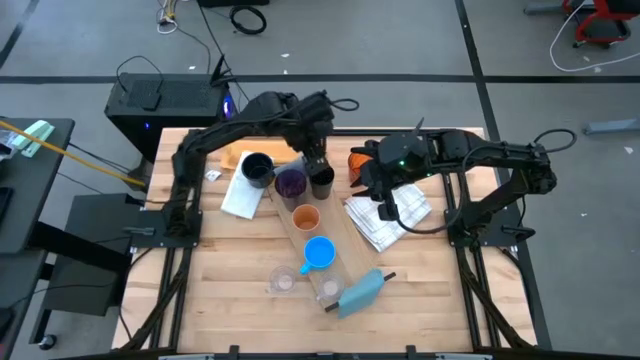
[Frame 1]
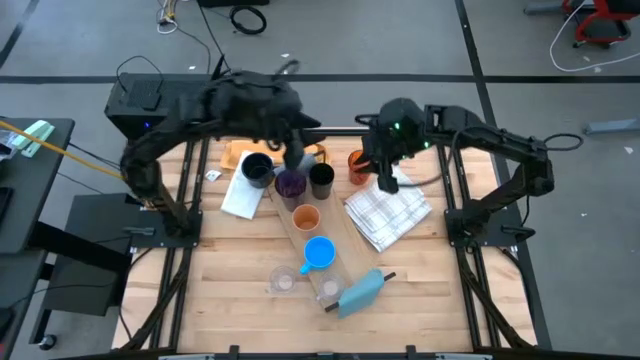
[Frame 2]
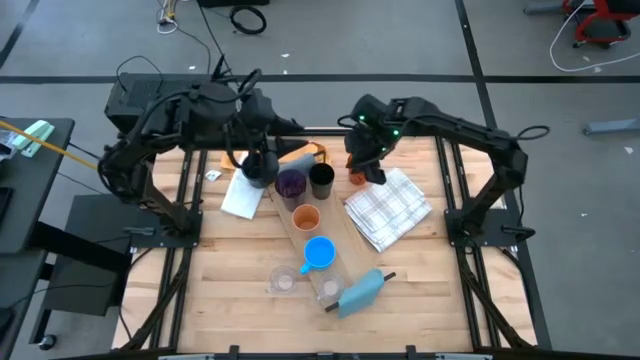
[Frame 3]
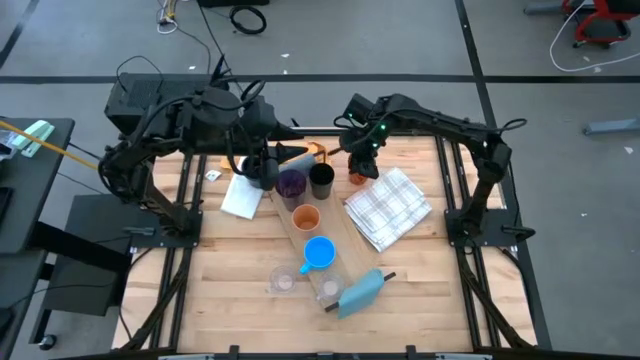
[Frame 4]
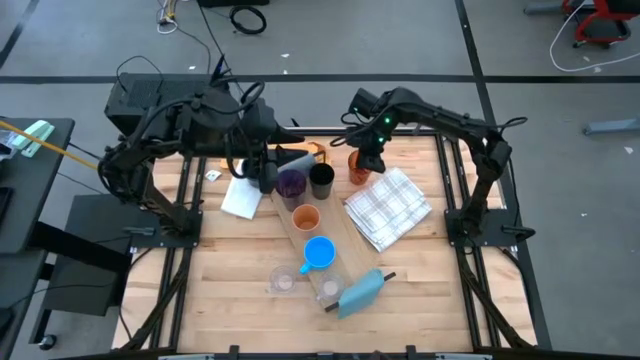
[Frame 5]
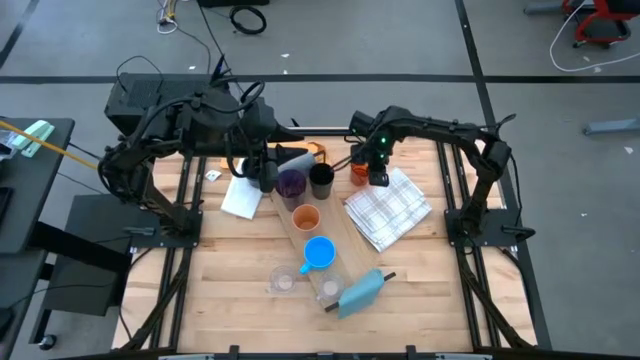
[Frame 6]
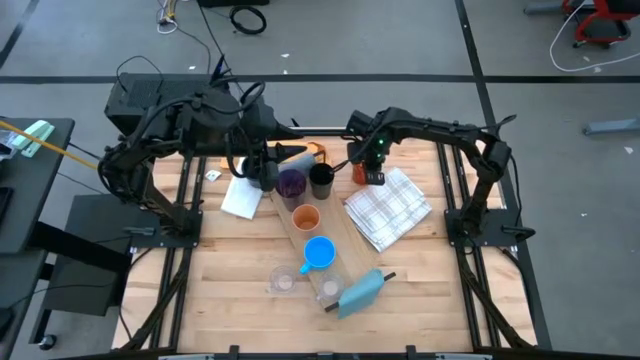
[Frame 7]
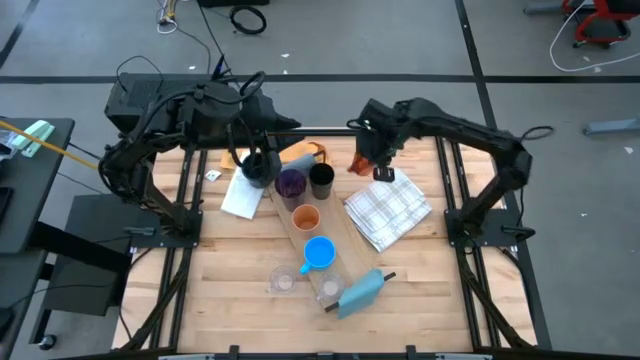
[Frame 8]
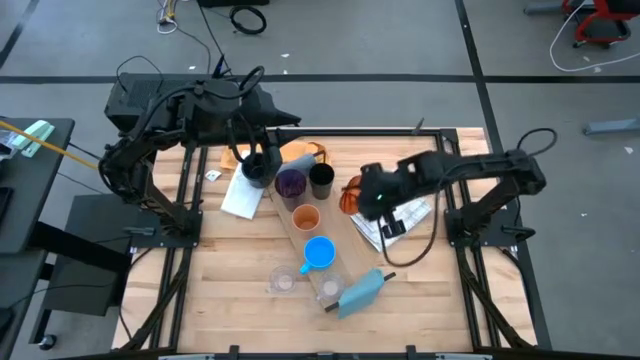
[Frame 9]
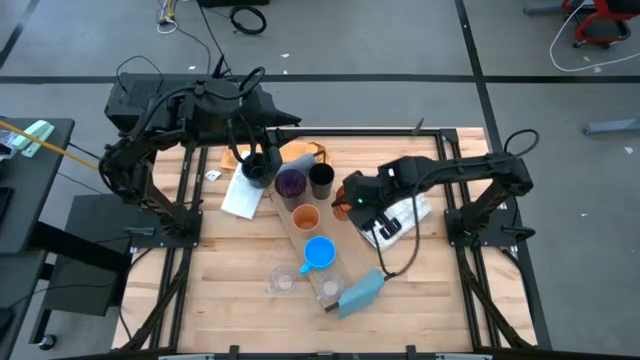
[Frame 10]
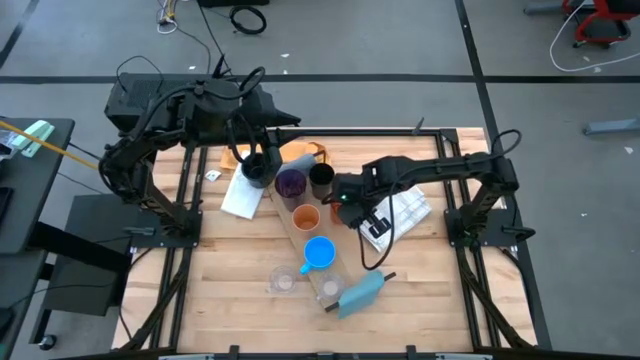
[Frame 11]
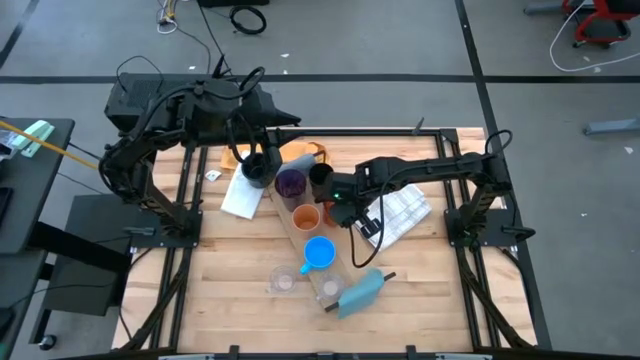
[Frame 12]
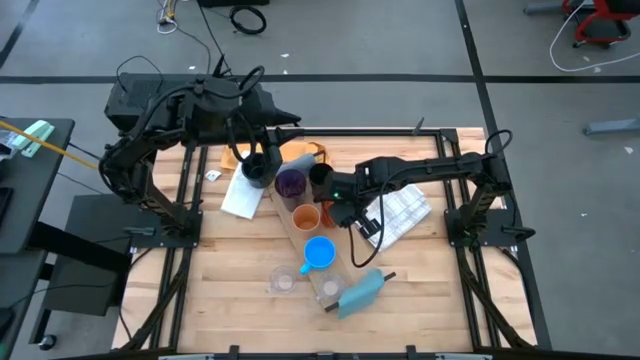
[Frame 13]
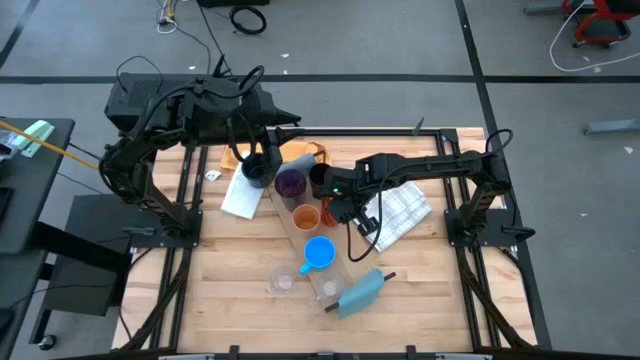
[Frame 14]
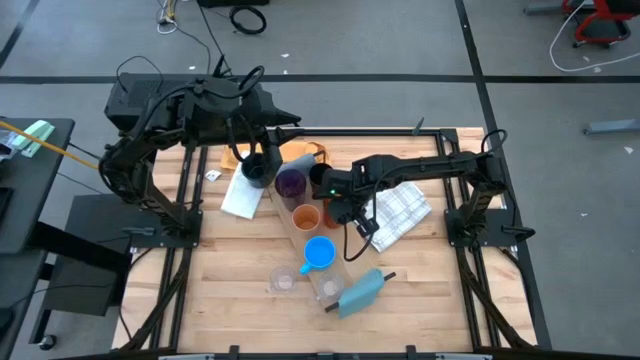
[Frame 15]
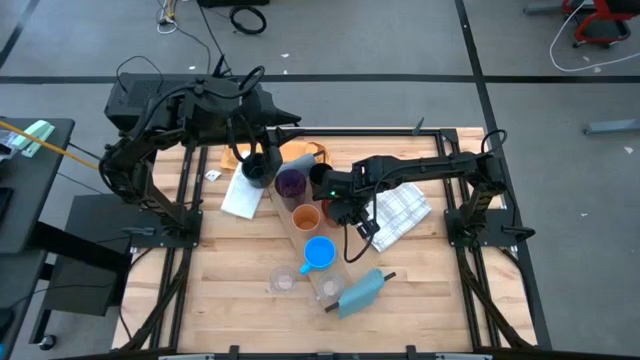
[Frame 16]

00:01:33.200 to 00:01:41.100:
Task: Stack small to large cups/mugs on shelf
Put the dark orange cup on the shelf

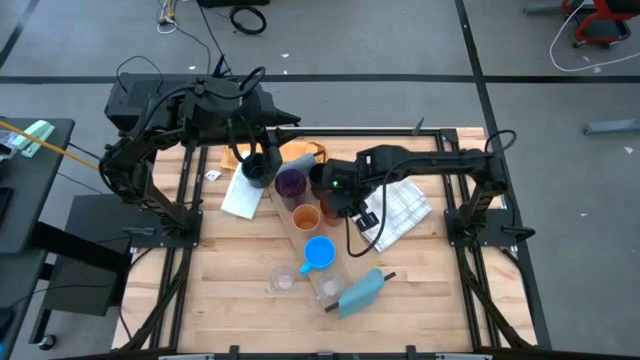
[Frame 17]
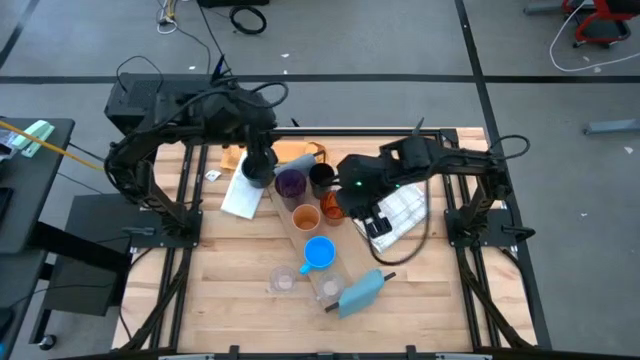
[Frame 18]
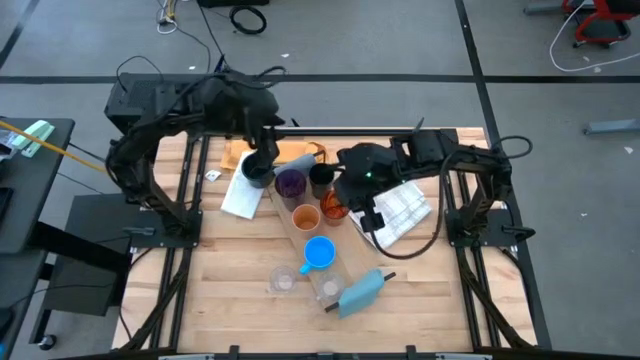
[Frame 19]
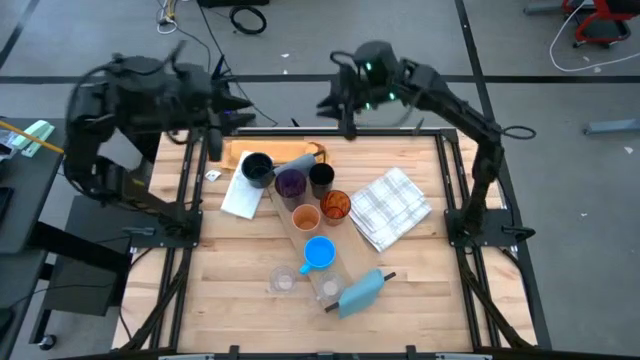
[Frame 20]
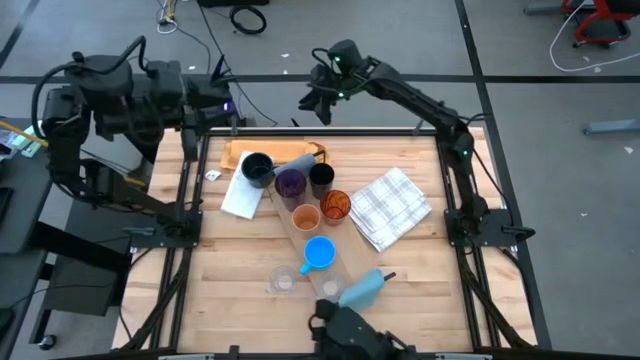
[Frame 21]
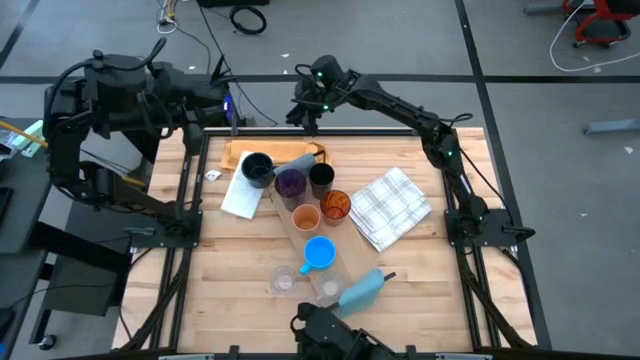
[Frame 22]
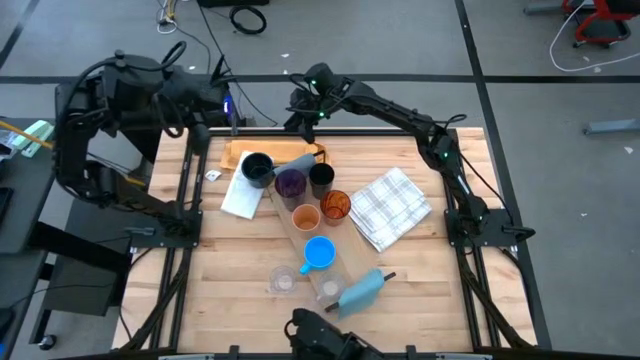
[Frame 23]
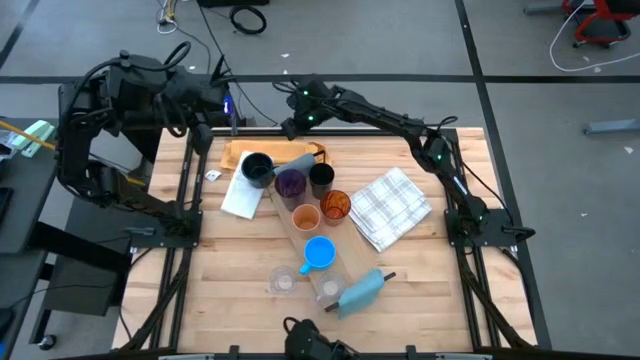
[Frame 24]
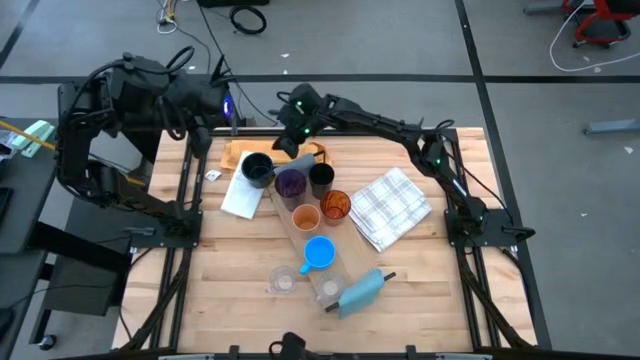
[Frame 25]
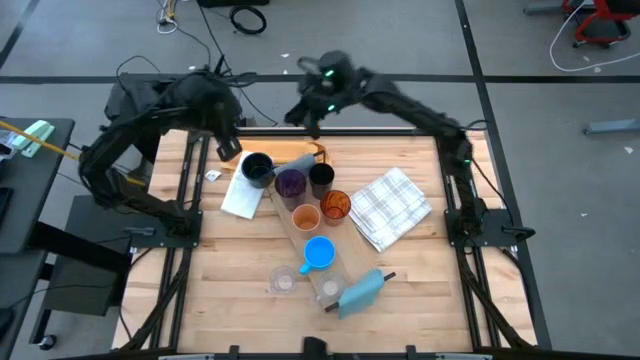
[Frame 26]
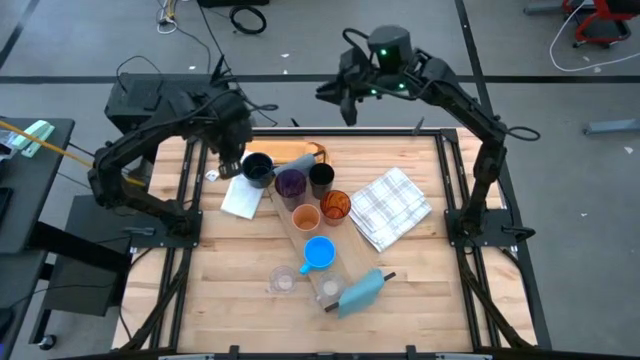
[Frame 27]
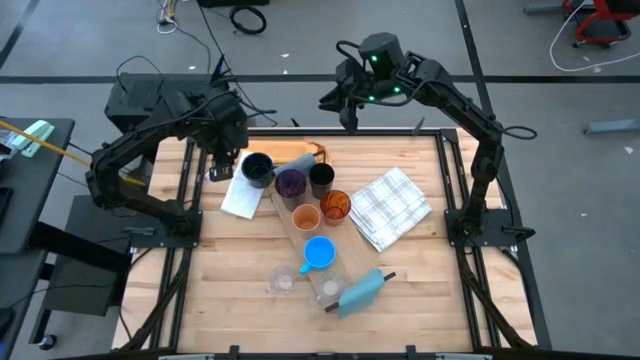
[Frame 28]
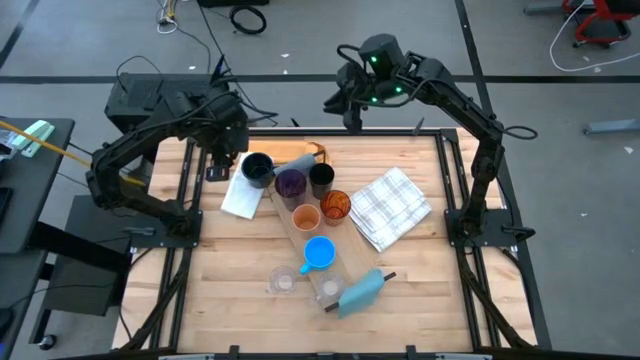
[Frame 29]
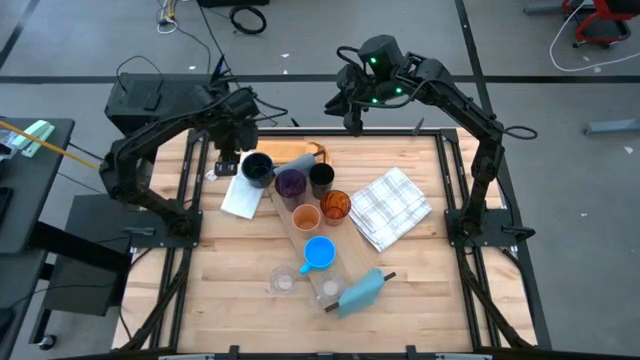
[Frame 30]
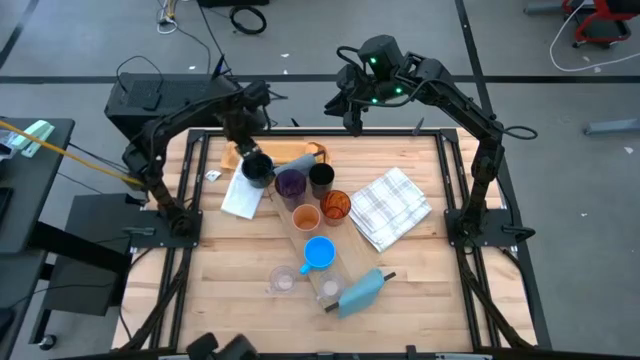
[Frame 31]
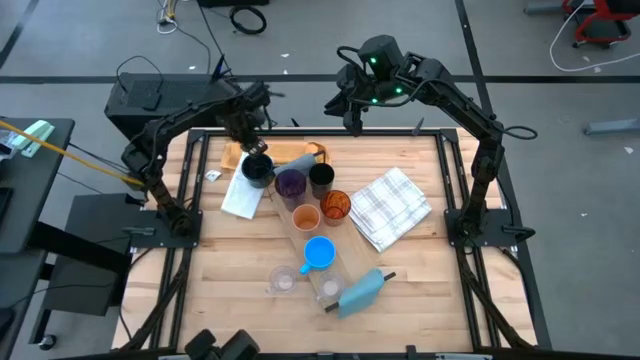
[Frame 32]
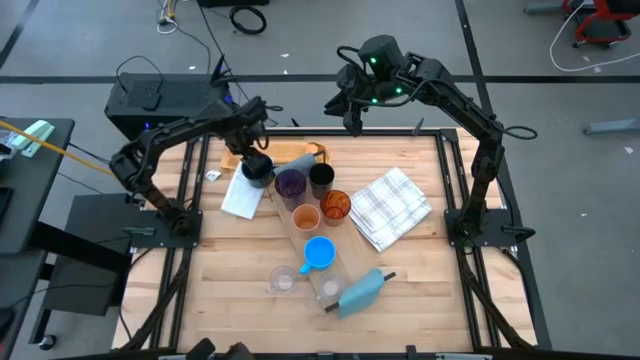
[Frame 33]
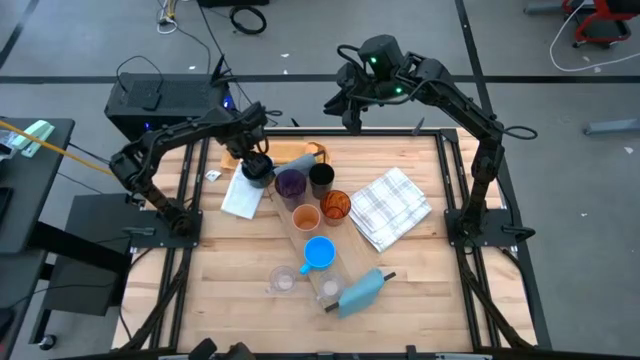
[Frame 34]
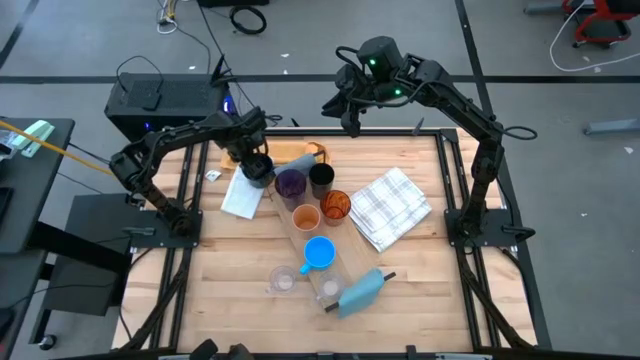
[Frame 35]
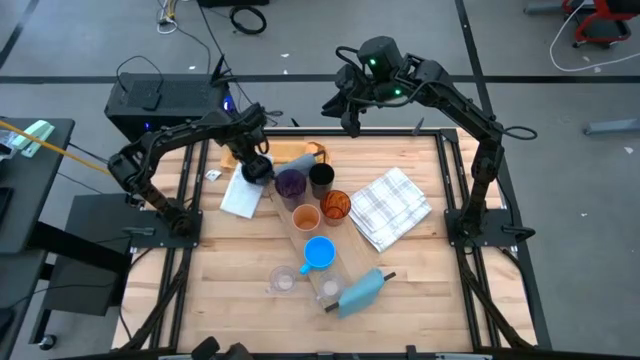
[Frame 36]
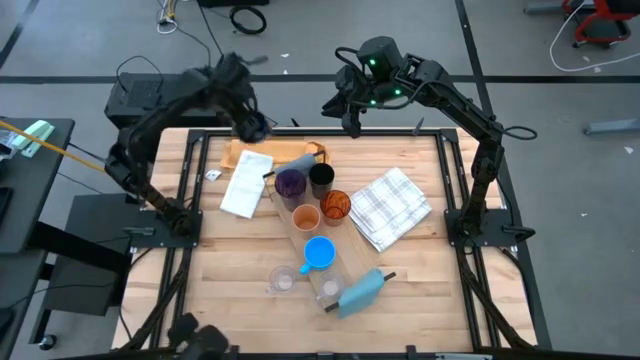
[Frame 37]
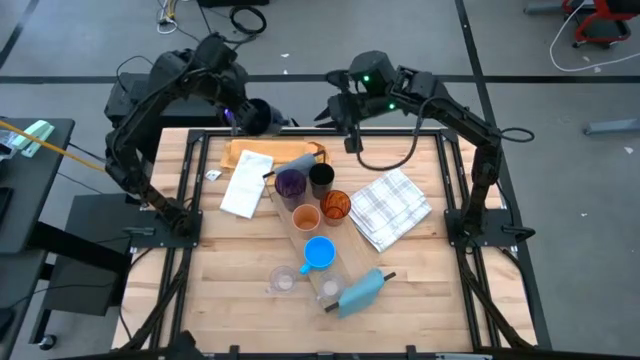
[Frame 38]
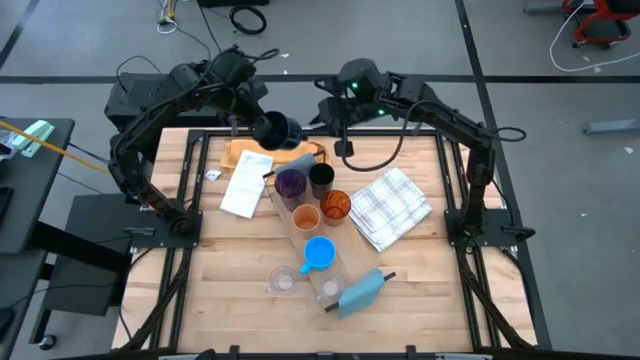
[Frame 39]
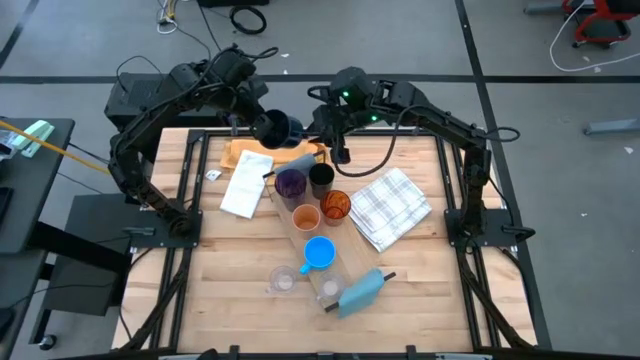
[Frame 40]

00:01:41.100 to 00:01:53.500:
Put the dark blue mug on the shelf

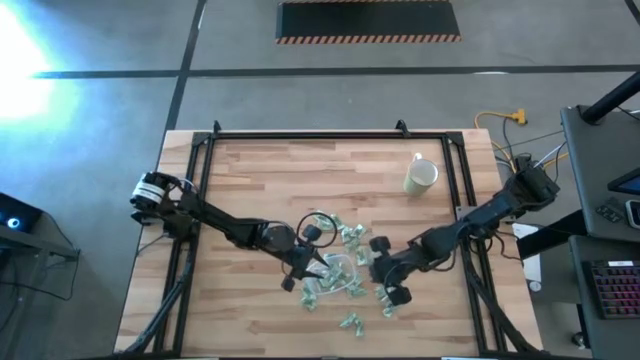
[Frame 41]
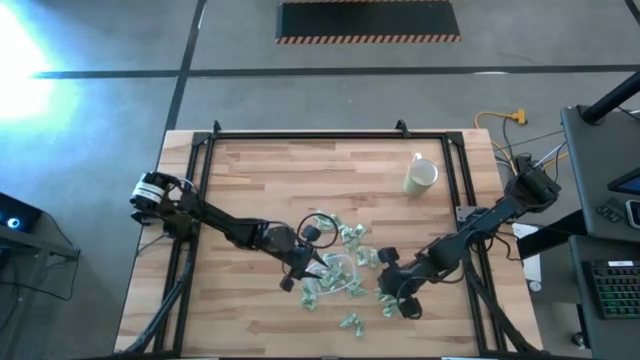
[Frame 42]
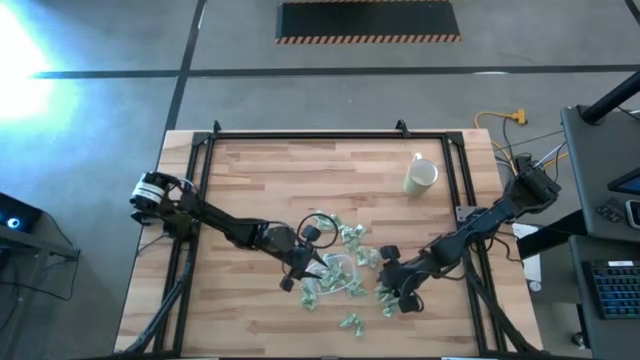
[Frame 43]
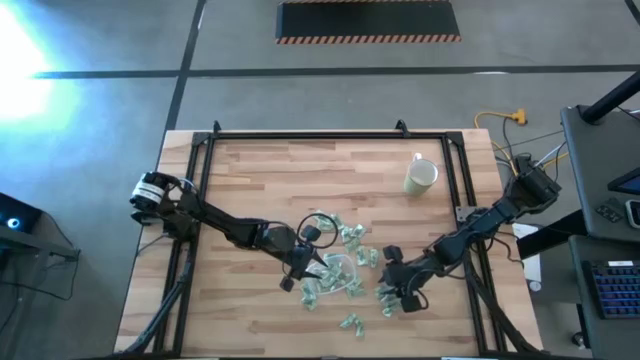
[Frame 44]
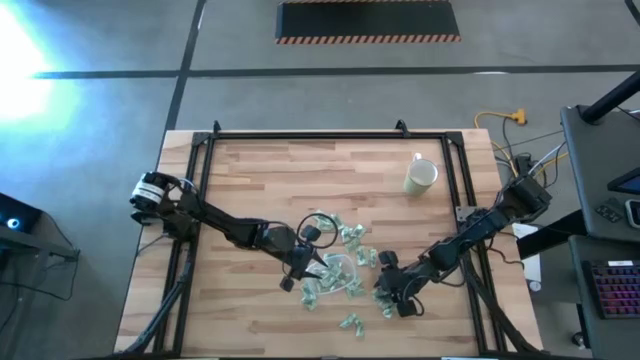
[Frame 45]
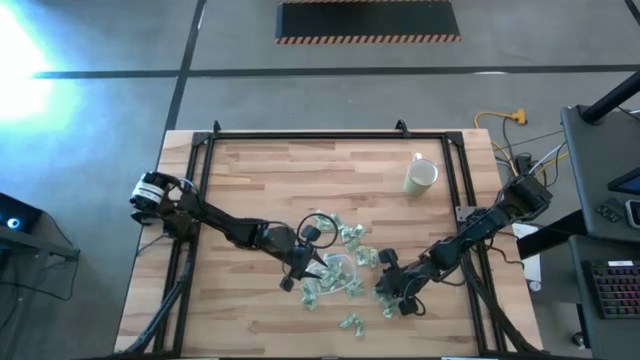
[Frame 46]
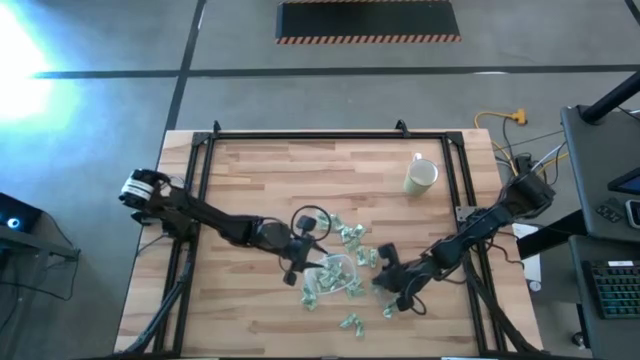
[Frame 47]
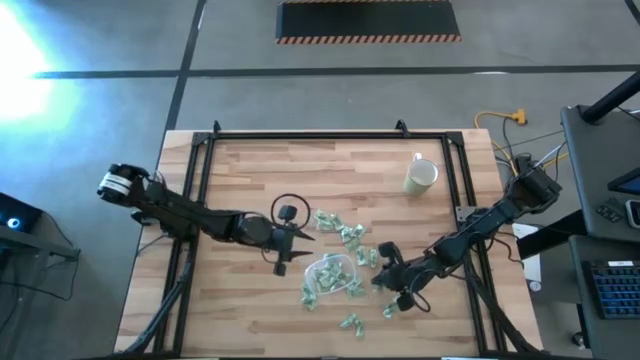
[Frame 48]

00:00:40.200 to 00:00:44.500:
Task: Pick and place items into bin
Put the Stevia packet into the transparent bin
